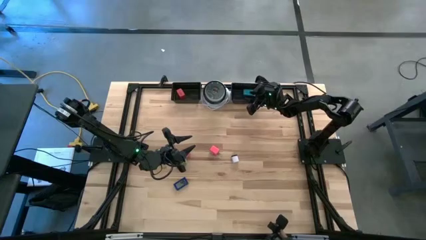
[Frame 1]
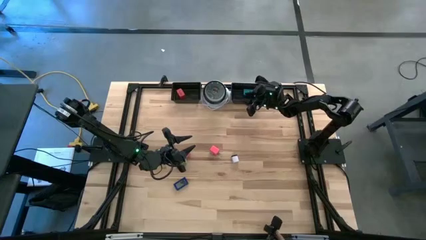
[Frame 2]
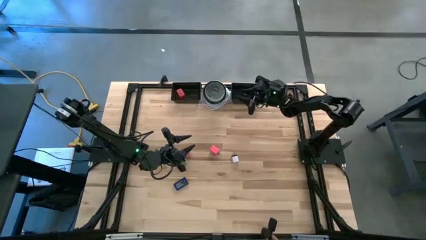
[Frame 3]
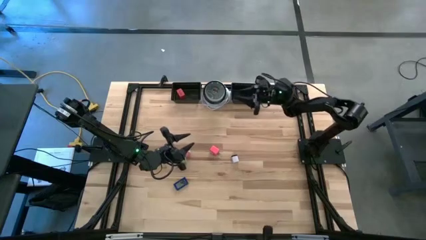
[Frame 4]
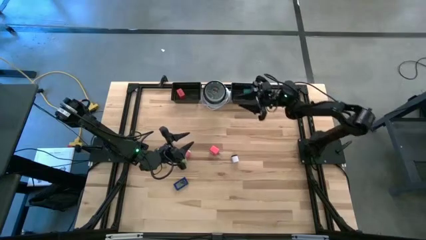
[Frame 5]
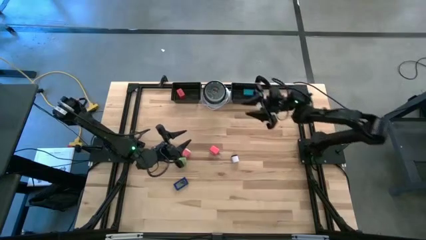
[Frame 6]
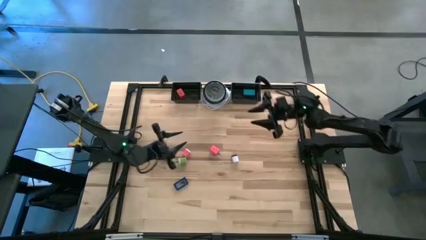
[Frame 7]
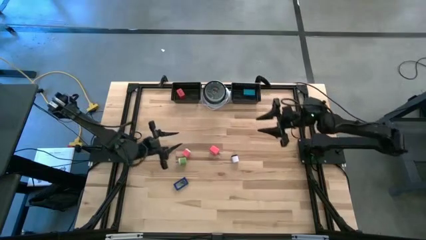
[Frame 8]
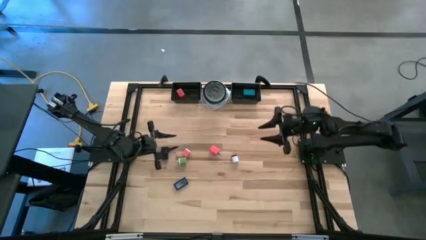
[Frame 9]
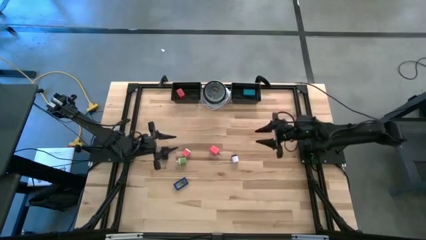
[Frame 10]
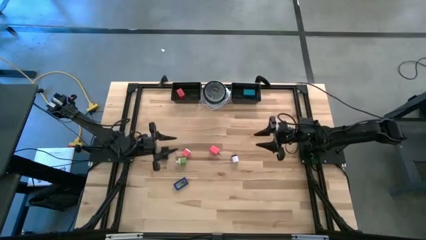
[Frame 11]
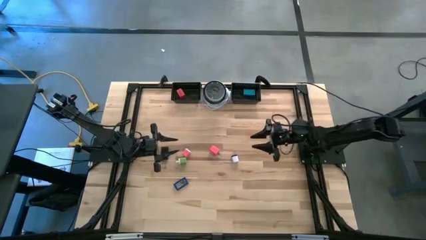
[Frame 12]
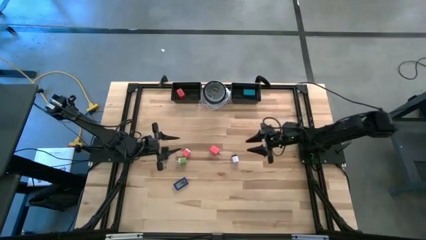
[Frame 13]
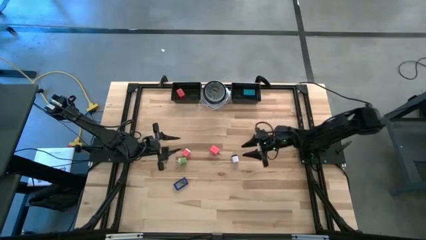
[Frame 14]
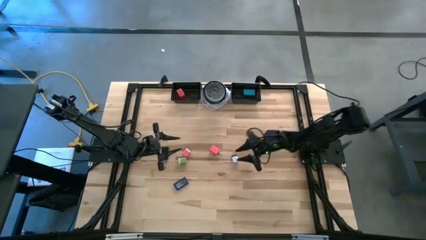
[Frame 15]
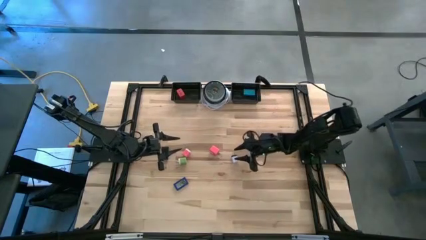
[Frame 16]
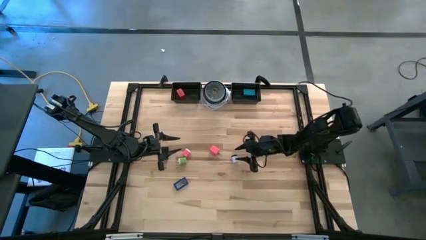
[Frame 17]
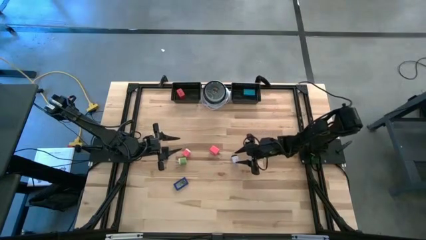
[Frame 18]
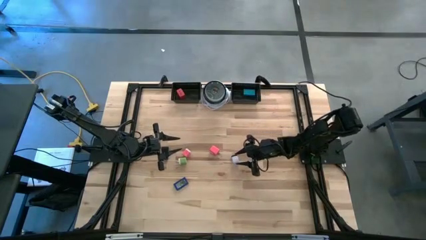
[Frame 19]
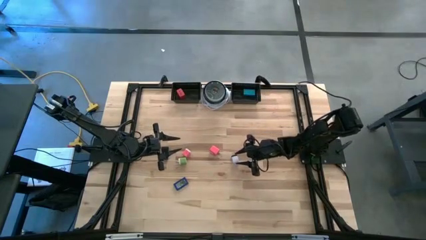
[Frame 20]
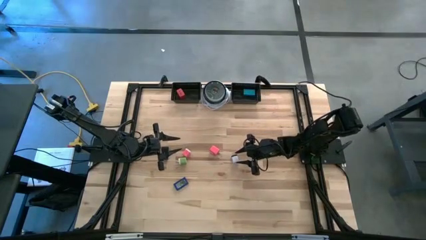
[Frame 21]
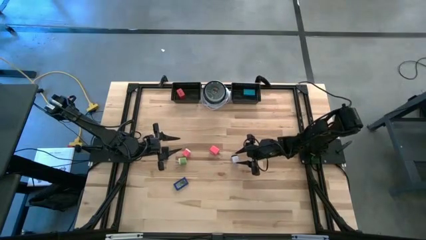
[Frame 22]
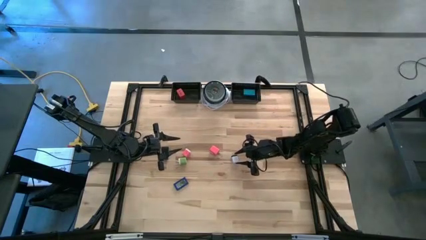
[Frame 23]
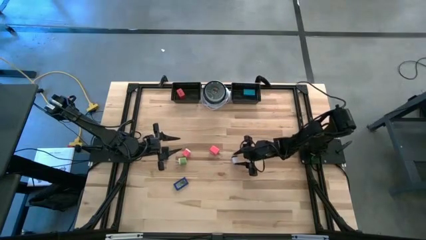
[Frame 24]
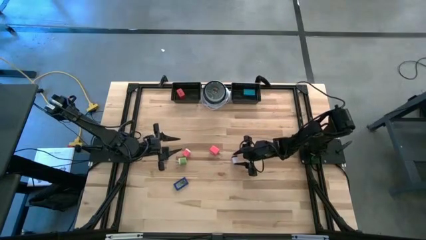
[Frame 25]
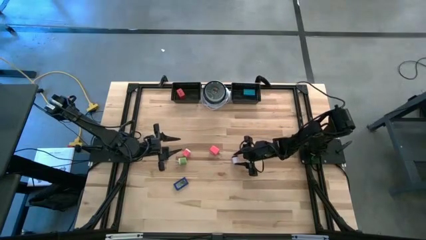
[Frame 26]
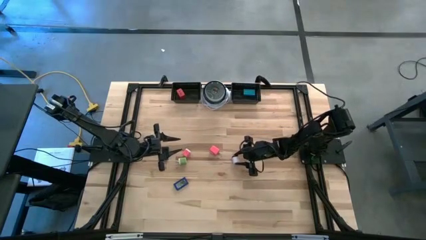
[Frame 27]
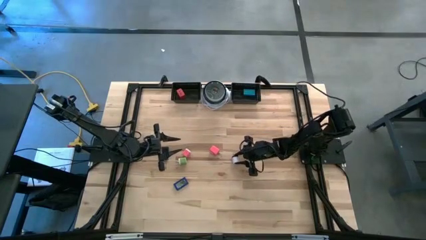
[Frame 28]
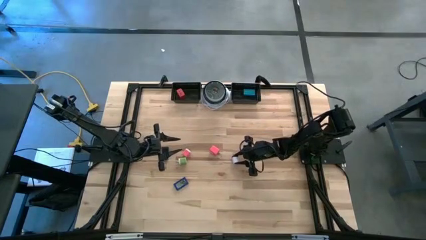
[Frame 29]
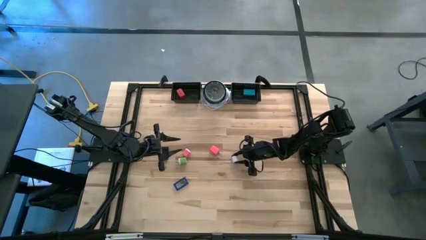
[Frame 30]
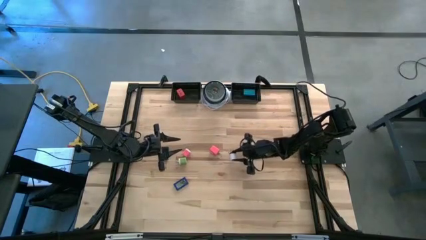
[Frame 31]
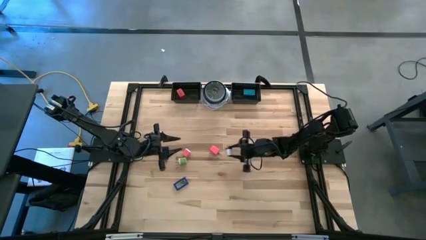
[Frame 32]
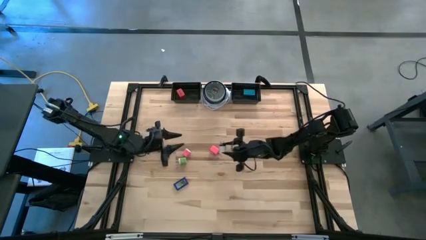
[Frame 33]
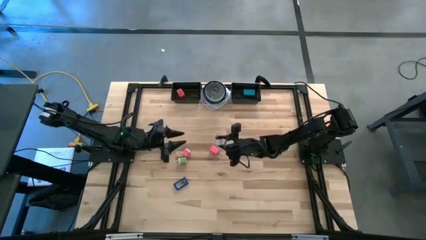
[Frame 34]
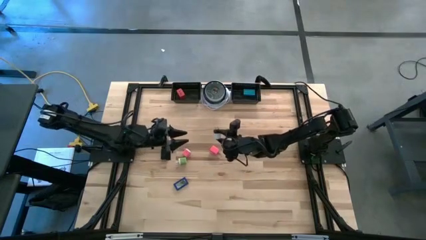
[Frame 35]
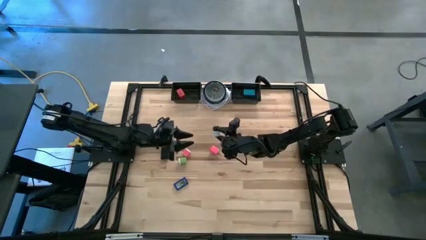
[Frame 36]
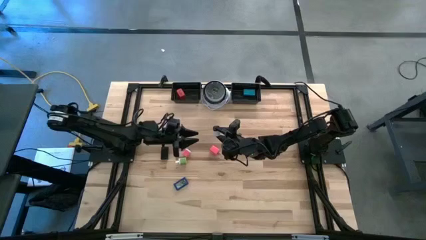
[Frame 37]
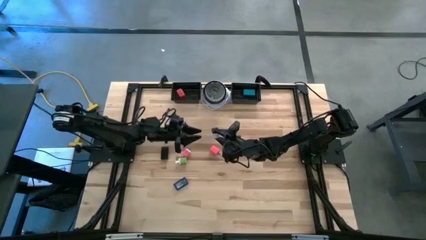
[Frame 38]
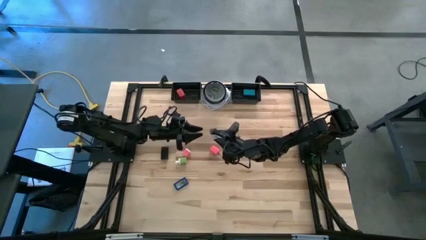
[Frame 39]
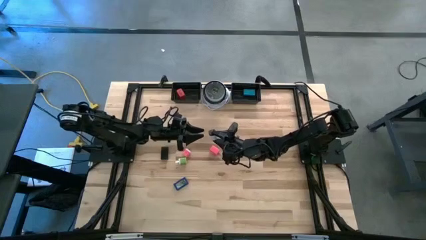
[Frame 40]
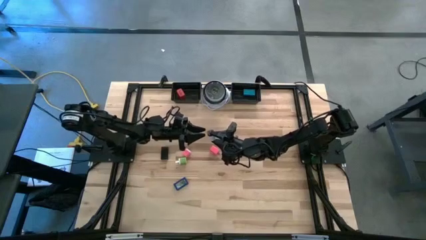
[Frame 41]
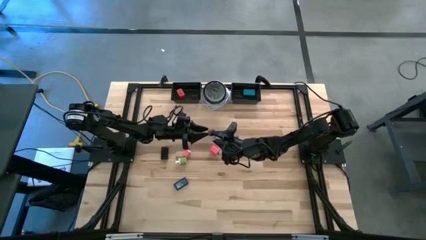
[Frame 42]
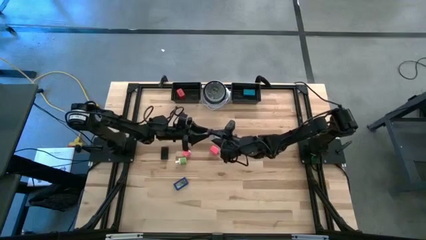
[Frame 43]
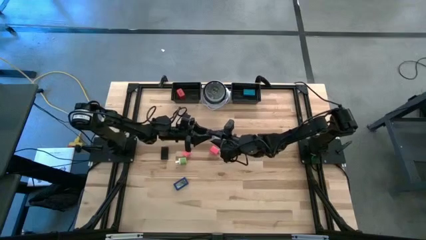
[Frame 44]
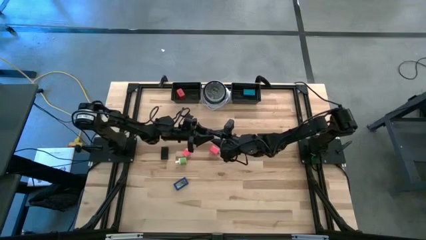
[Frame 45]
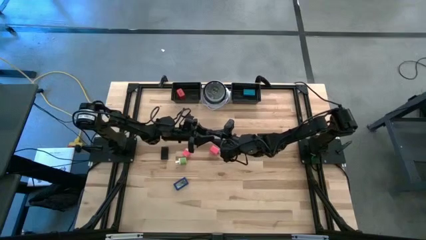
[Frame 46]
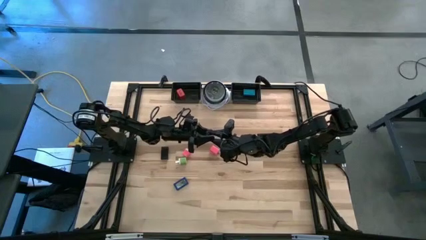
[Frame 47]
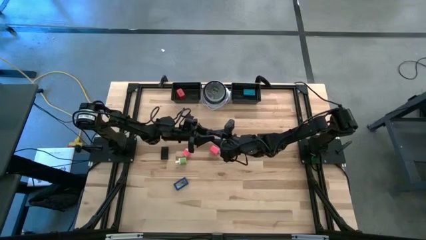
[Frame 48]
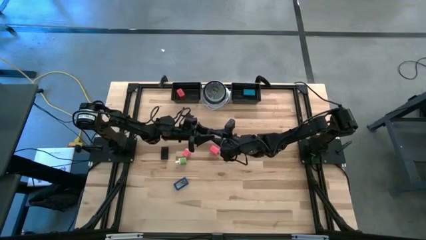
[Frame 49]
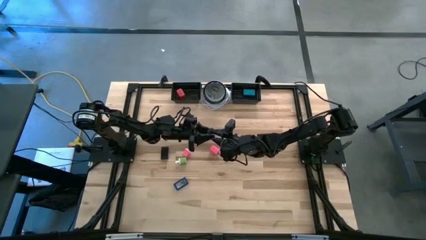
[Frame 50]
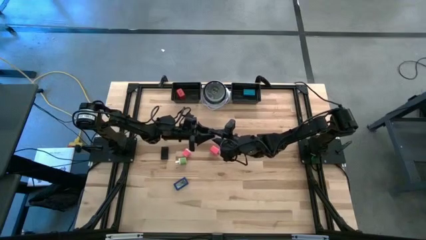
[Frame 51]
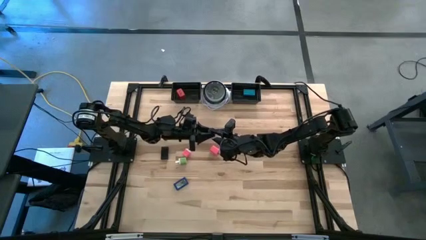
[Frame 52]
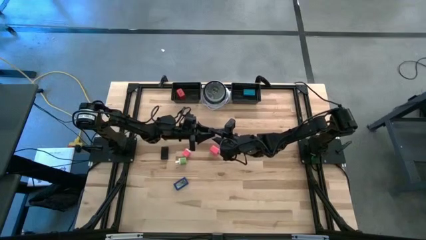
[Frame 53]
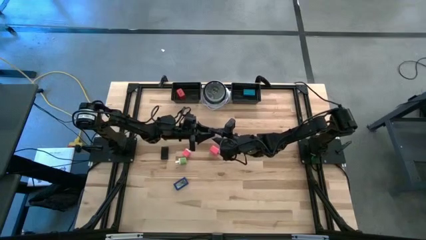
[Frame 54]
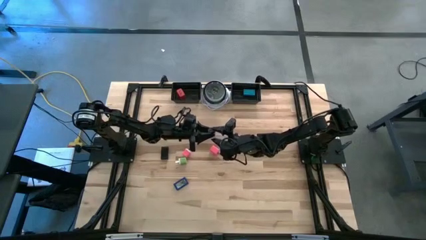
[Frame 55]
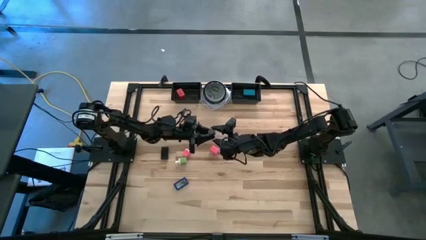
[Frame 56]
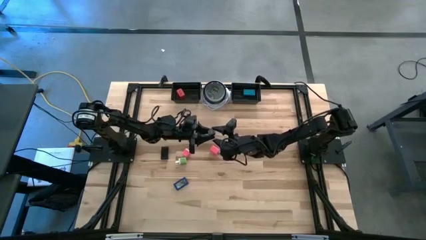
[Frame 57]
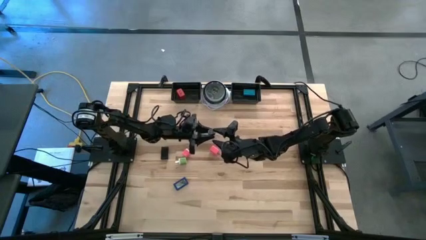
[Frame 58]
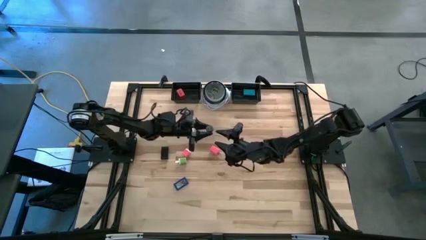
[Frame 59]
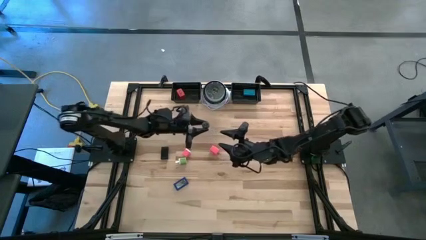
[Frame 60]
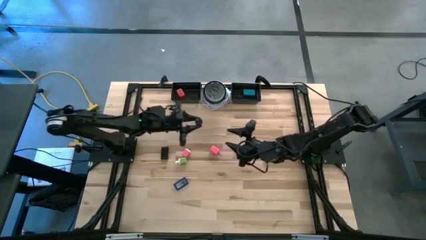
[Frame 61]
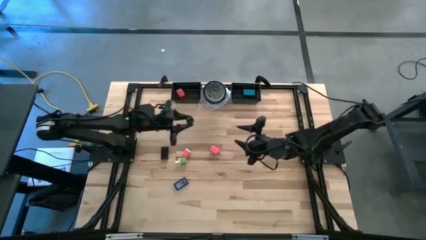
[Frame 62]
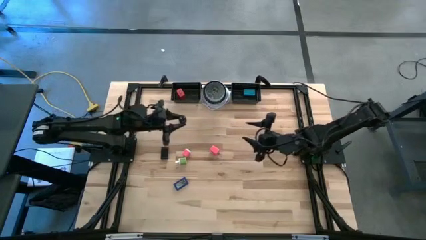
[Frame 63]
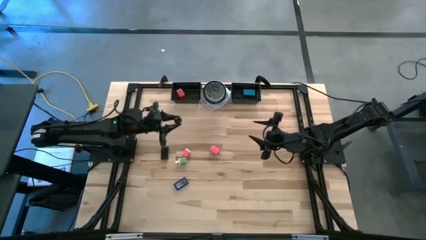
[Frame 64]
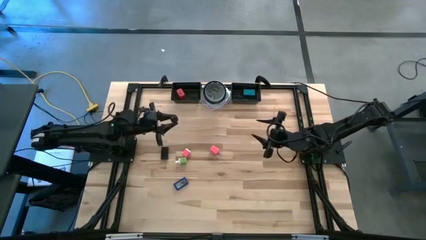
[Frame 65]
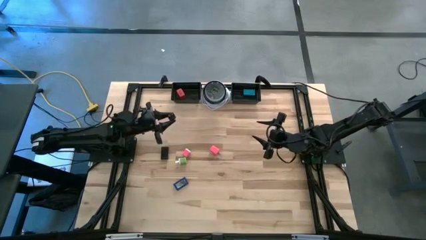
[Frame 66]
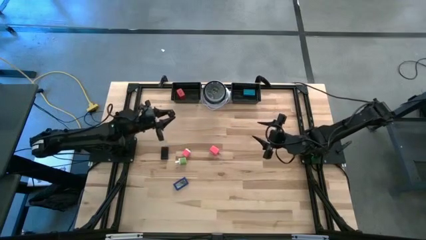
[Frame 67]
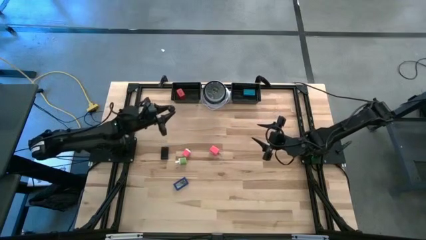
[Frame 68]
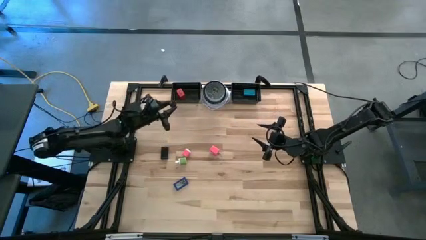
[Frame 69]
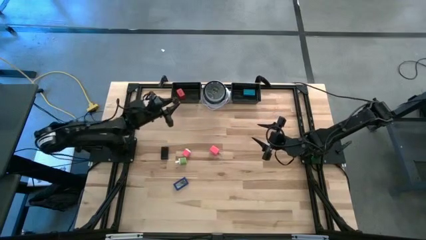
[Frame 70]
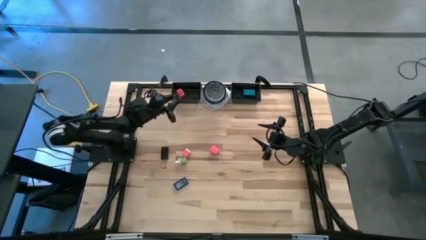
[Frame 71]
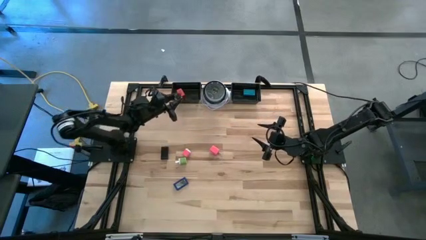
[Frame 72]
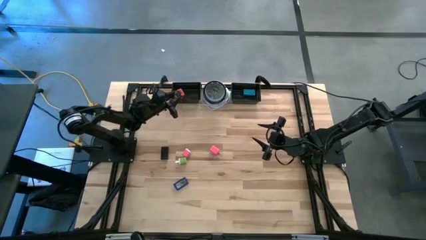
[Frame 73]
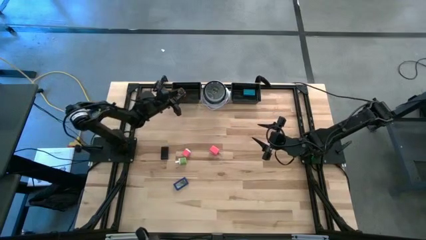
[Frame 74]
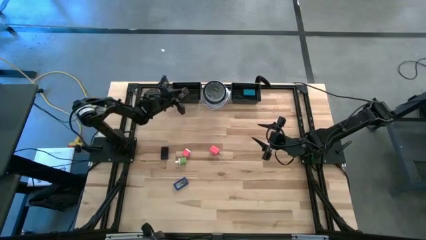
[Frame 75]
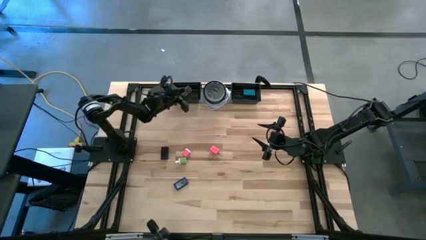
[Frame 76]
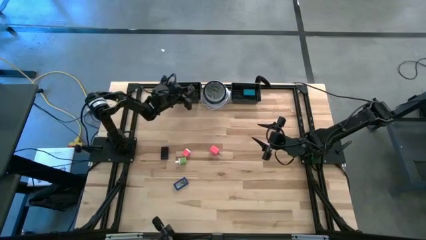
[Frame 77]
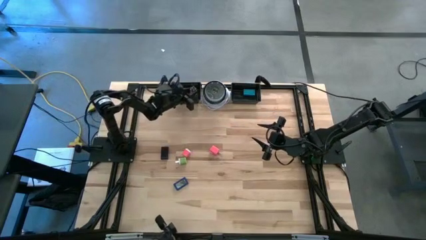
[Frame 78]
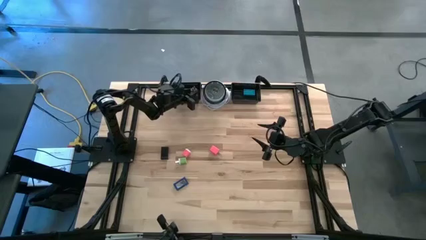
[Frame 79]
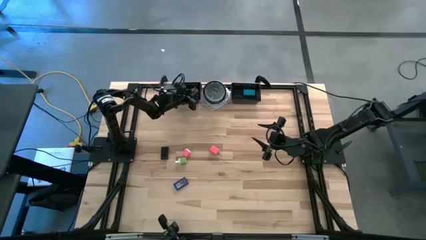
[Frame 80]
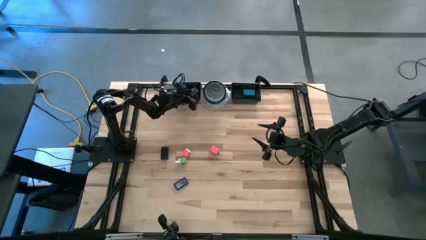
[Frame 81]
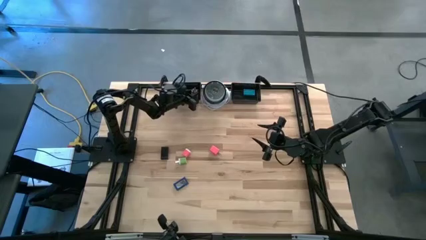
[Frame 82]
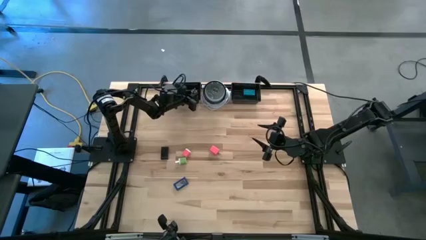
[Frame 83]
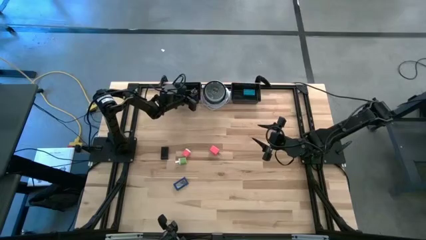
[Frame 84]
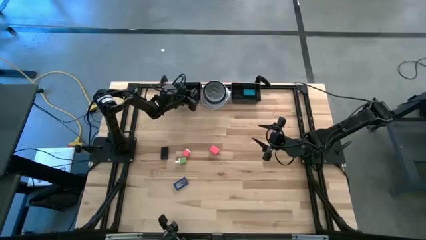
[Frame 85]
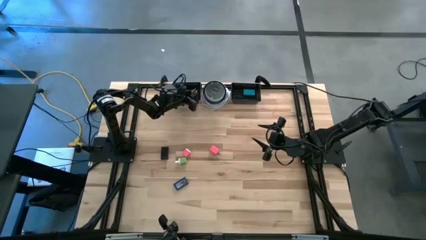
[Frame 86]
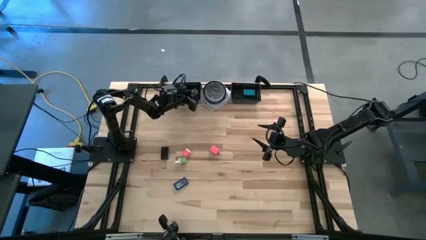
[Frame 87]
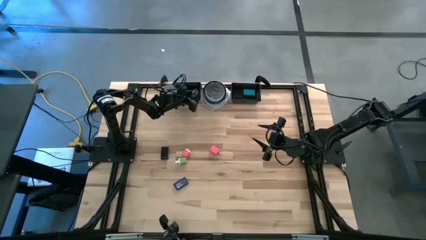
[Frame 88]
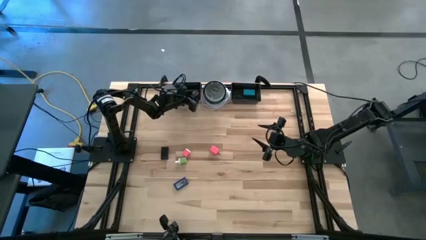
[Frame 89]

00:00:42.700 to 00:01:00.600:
Task: Pick & Place Office items
Put the white charger adapter into the left black basket
